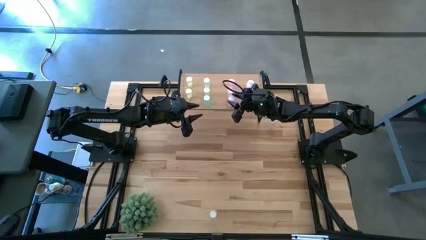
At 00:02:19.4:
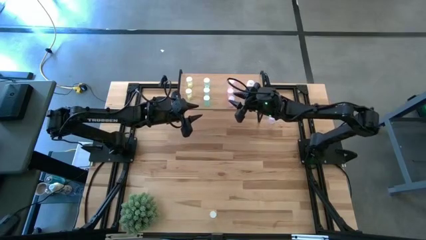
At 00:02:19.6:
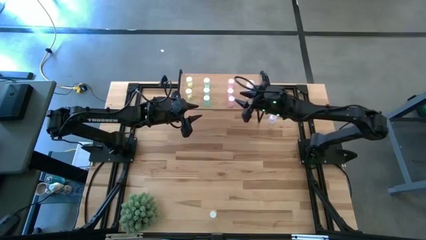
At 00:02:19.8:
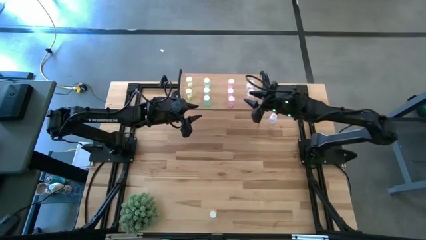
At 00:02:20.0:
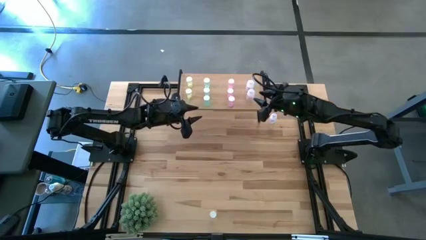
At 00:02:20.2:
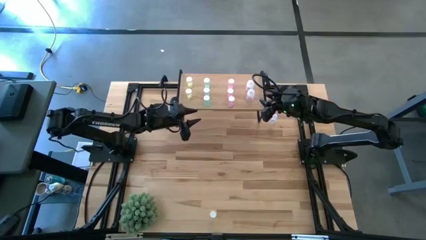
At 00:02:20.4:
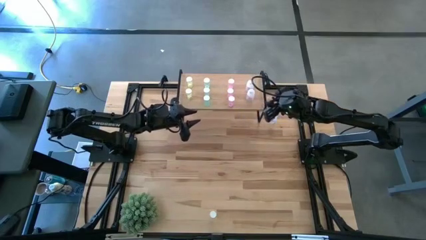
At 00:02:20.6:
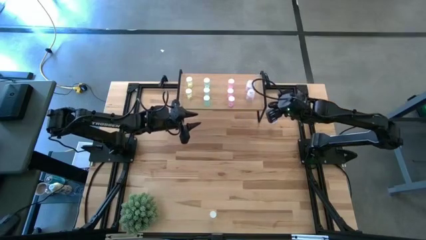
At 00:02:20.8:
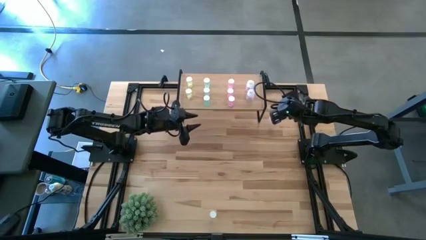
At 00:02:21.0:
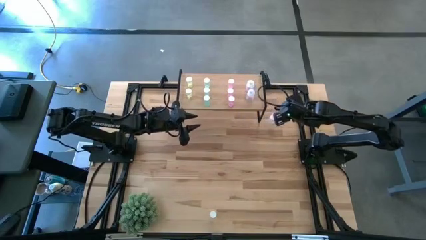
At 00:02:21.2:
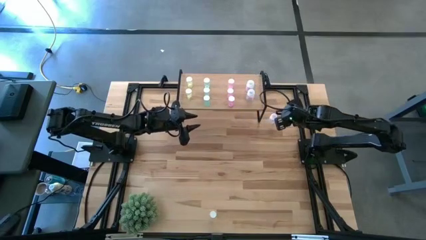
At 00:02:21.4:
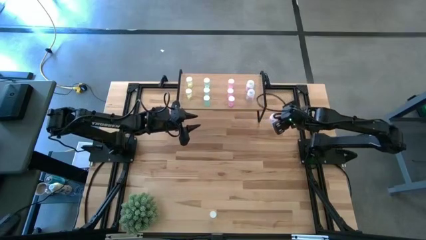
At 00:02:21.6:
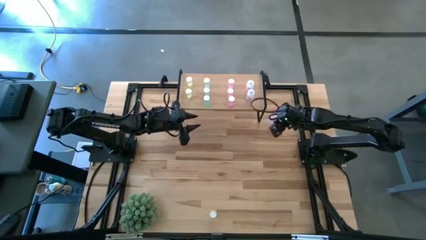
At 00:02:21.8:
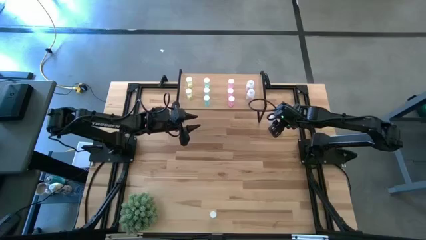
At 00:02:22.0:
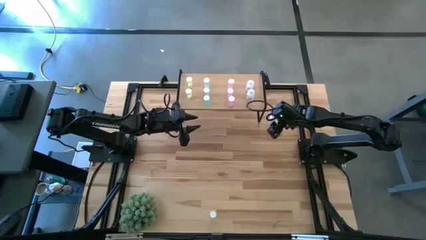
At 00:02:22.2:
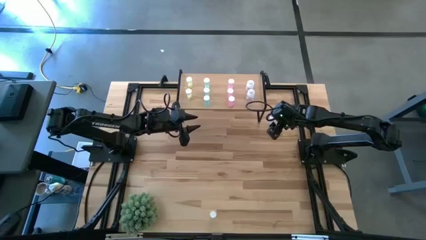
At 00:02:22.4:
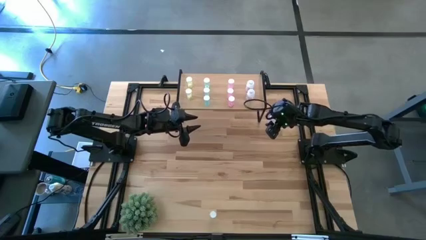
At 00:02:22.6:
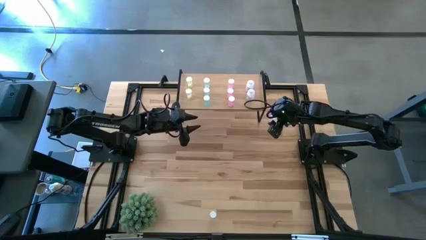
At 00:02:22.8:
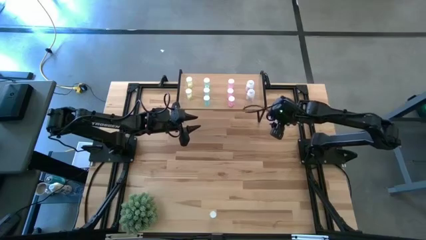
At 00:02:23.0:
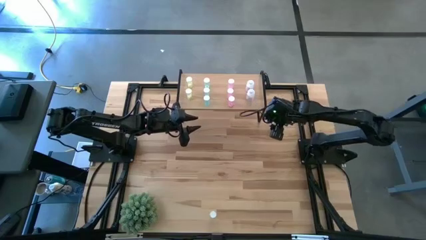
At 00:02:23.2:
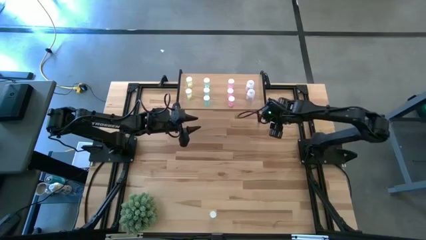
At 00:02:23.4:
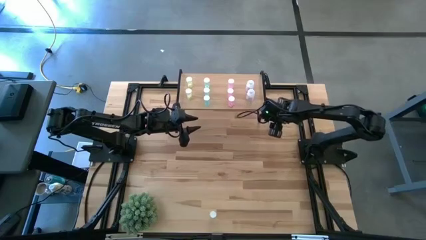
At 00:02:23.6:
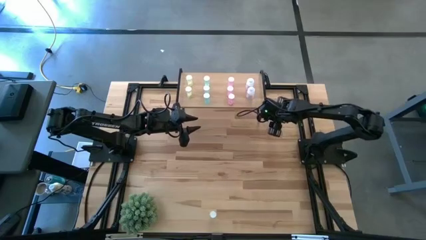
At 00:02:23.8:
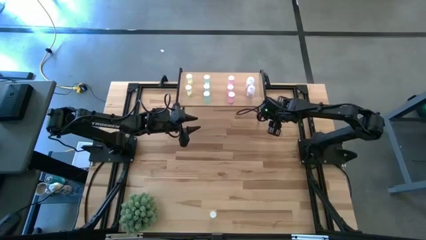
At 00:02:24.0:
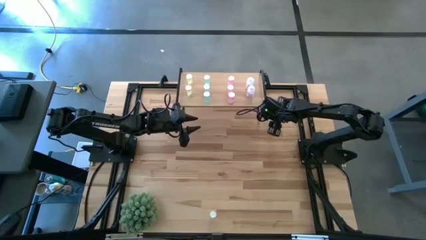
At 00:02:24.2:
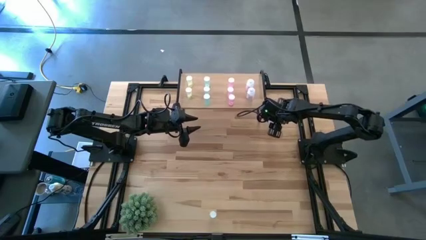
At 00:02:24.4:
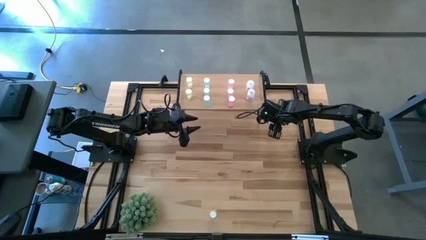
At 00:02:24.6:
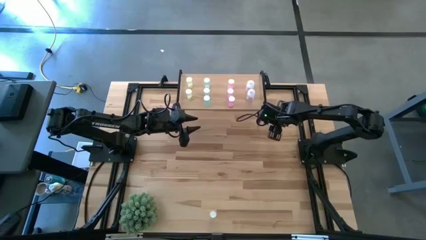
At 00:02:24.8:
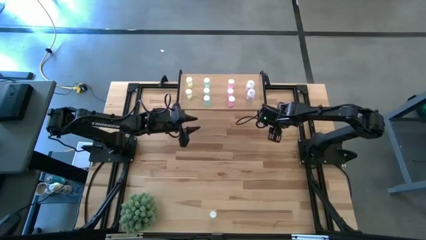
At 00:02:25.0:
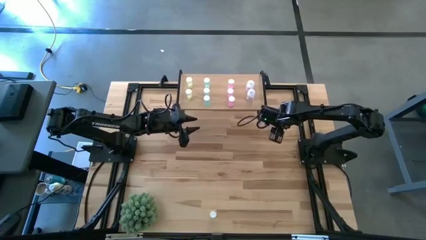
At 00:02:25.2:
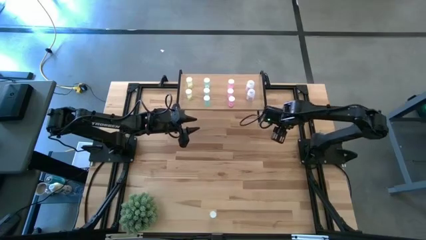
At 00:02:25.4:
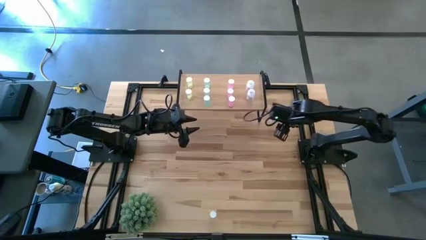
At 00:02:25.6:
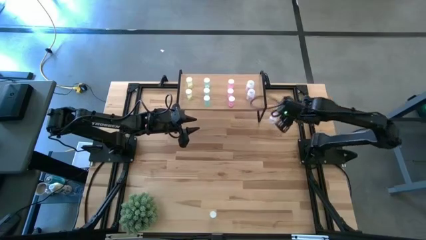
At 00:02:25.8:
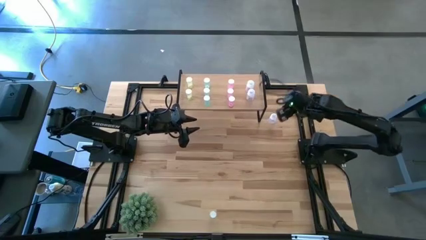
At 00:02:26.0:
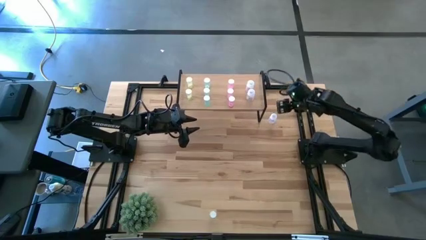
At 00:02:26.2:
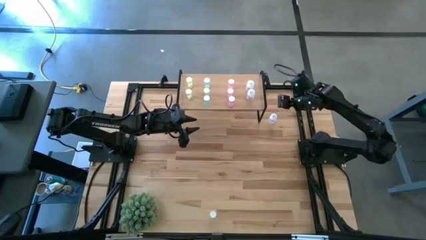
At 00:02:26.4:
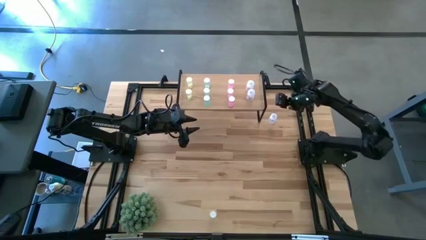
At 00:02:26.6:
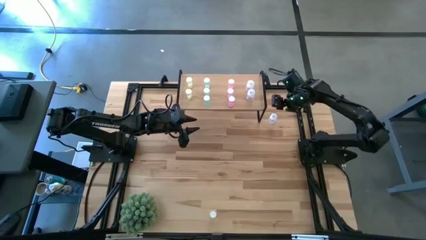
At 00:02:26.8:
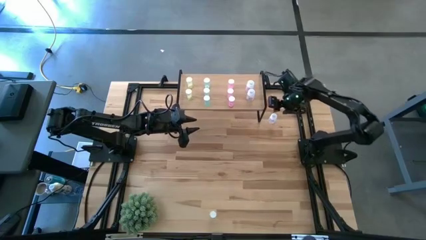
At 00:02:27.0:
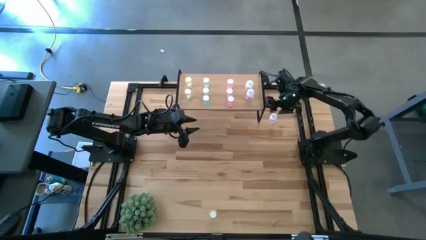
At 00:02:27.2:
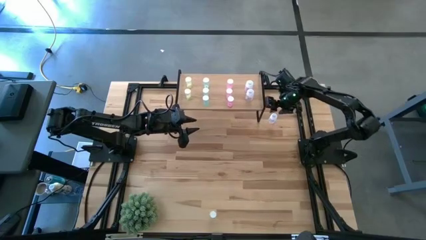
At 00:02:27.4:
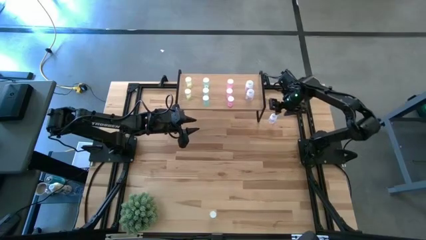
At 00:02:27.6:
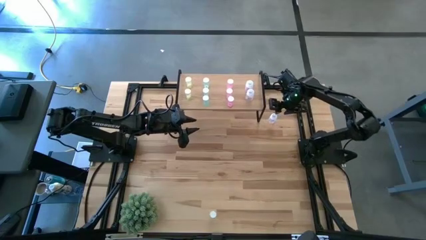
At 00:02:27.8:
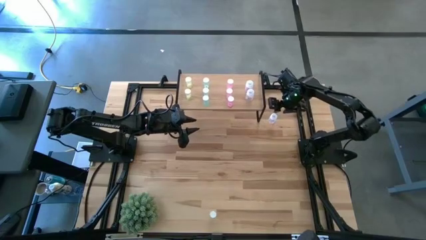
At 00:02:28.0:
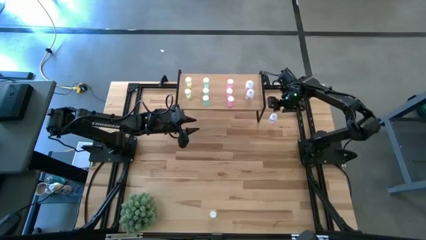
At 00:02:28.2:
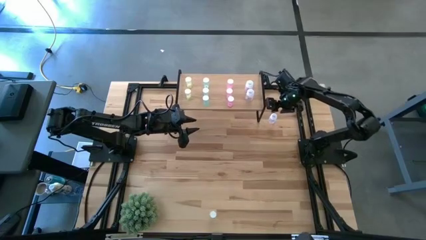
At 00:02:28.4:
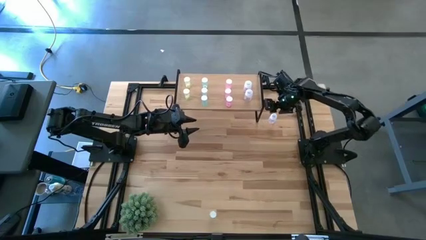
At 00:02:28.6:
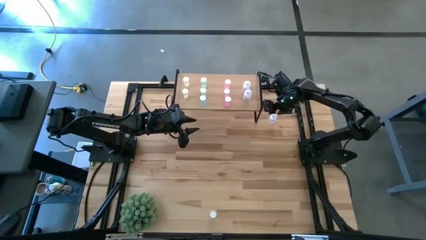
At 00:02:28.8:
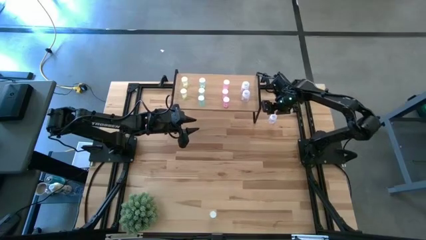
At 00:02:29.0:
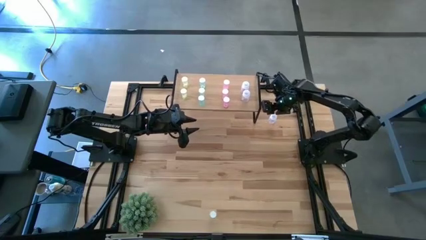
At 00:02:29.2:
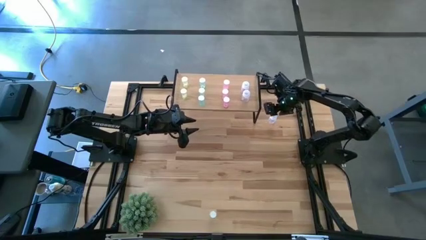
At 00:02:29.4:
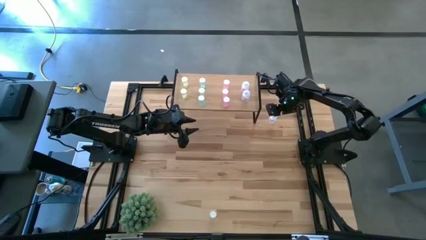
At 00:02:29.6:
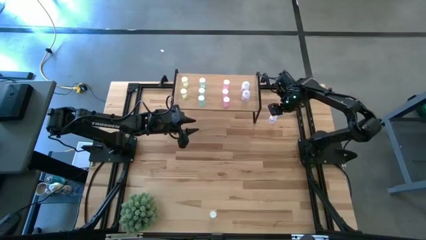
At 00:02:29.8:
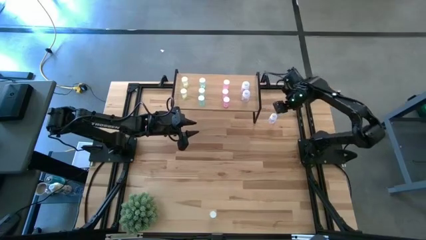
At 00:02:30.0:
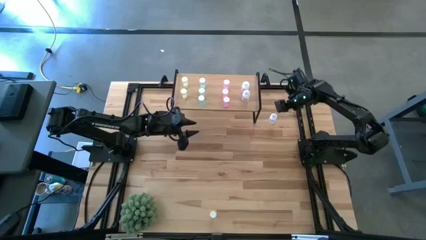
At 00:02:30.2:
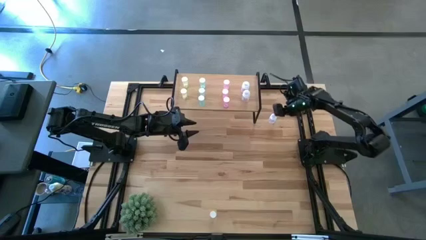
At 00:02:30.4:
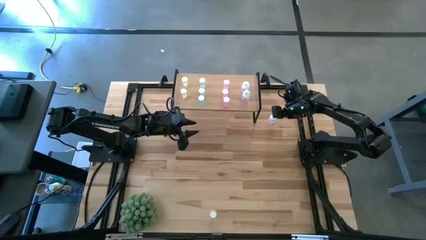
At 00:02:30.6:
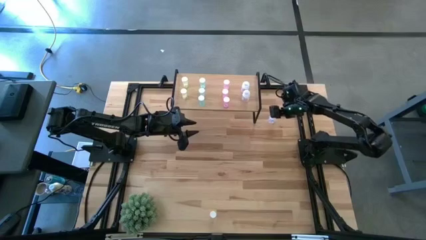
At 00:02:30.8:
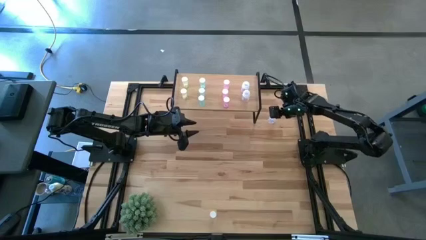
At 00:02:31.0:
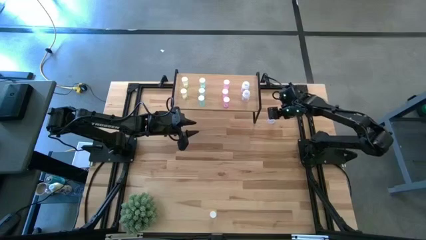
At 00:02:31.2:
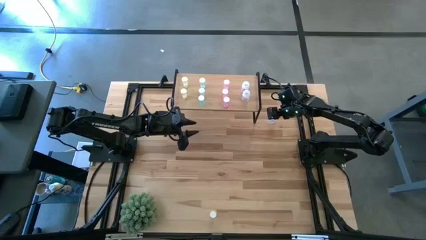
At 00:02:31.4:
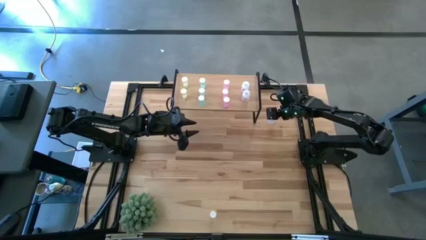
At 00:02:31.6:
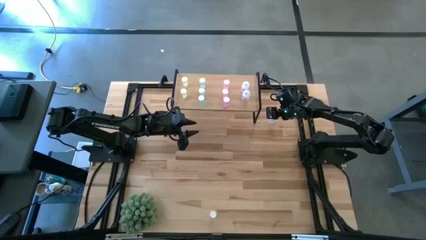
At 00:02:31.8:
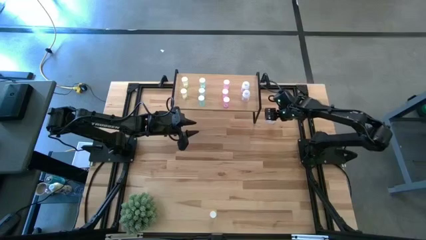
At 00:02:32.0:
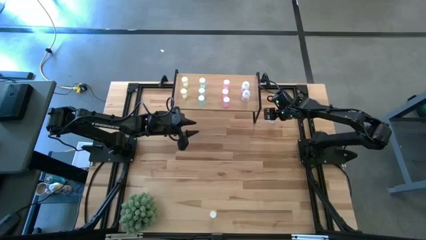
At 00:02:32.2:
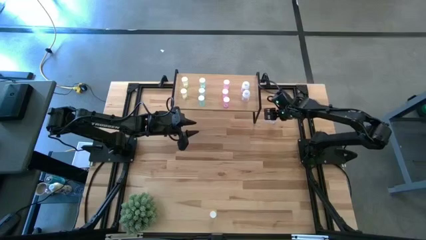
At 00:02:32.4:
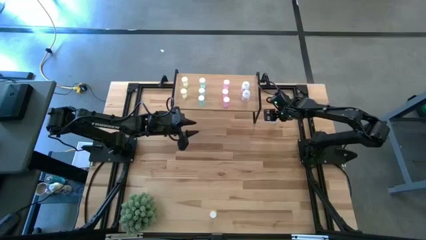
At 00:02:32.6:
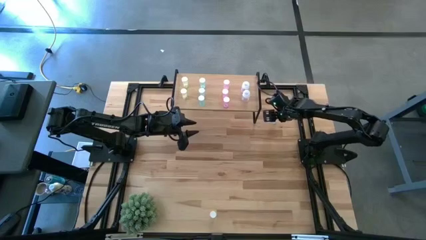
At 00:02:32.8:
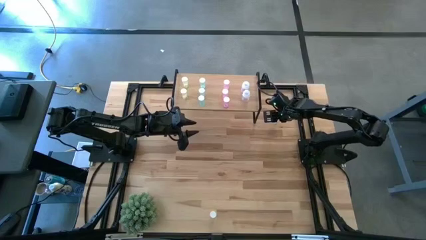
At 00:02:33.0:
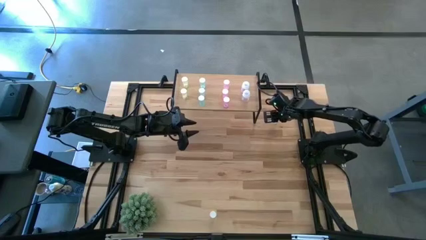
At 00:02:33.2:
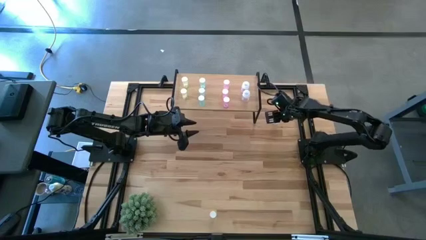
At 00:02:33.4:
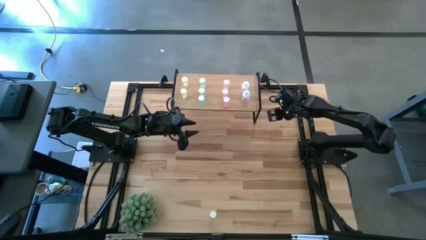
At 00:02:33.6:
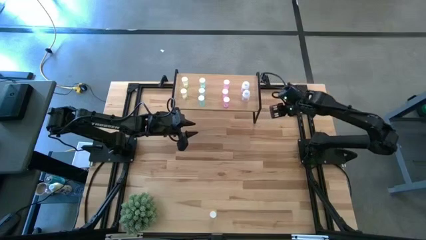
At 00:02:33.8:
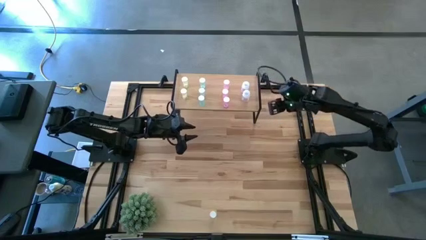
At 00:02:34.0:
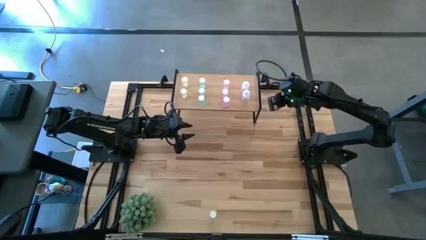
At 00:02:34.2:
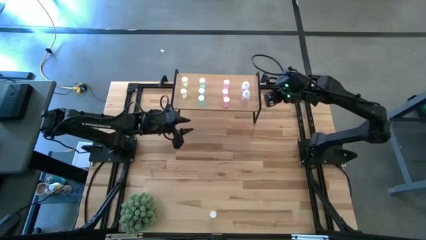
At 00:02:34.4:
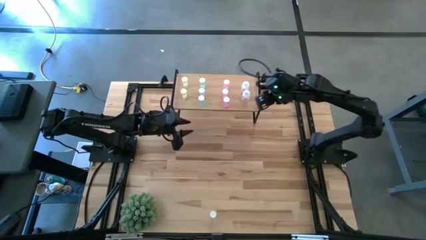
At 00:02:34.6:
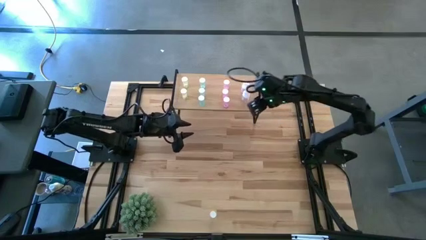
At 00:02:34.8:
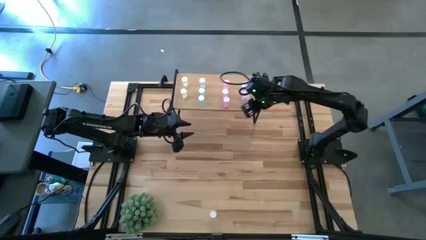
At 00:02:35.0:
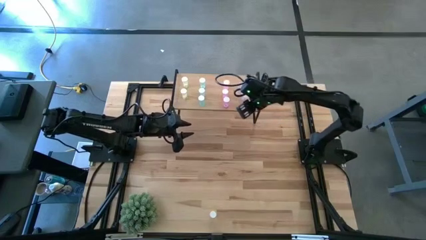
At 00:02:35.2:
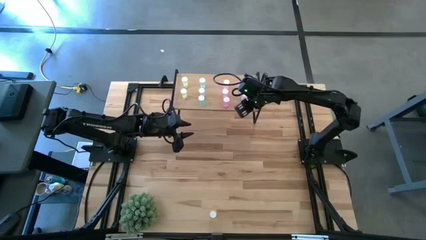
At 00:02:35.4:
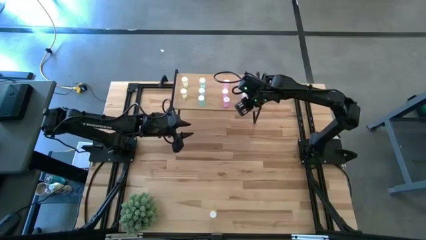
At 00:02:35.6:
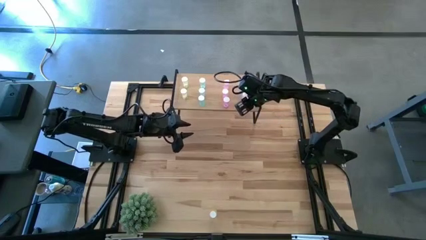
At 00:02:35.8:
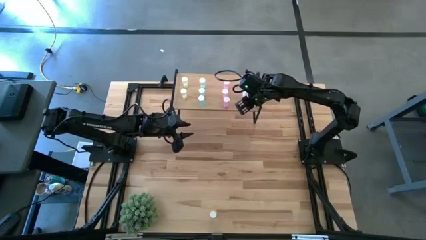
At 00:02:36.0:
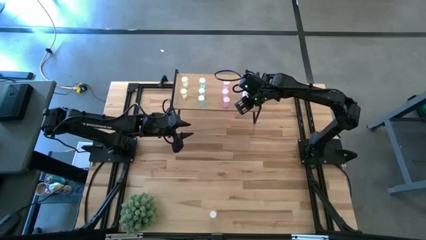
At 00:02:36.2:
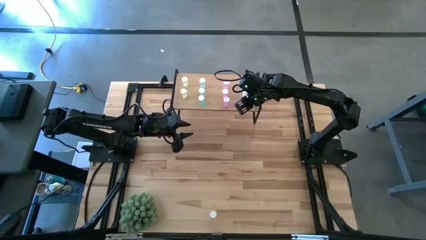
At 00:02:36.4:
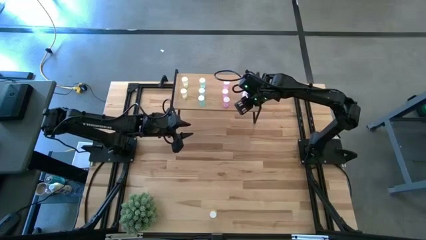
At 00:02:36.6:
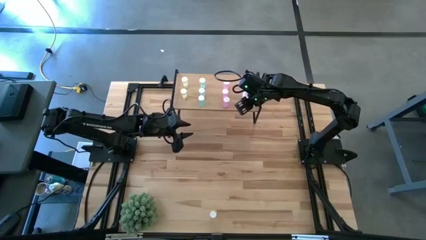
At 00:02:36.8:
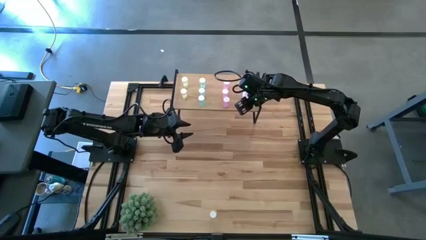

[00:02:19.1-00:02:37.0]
Task: Pick and place medicine bottles onto shelf by color
Put the transparent pill bottle and align it with the other transparent pill bottle on the shelf
